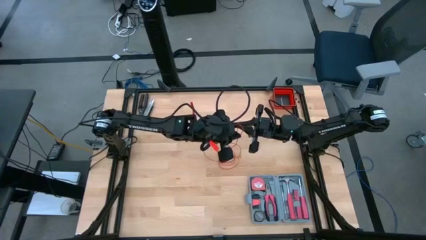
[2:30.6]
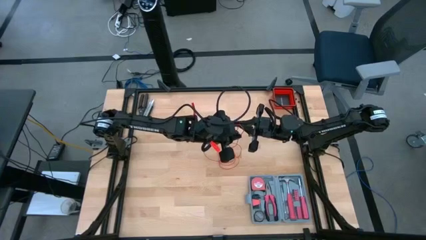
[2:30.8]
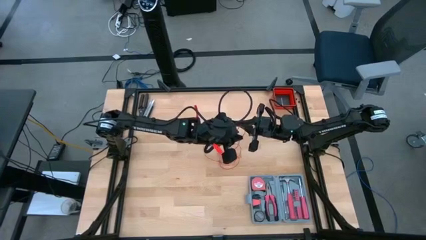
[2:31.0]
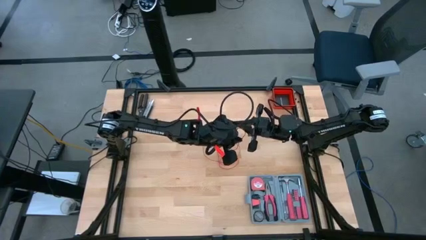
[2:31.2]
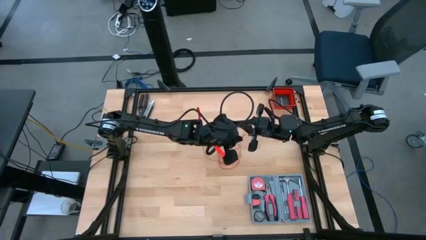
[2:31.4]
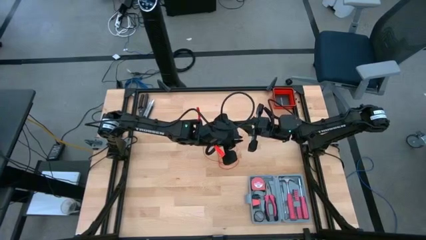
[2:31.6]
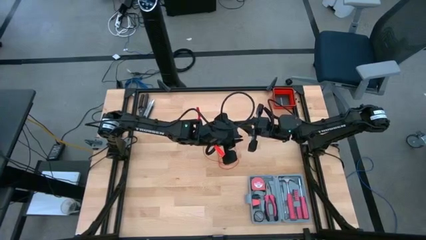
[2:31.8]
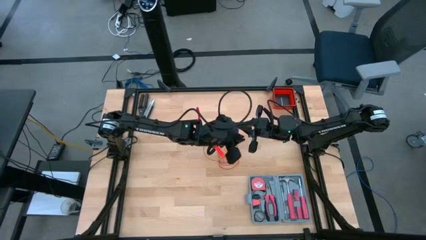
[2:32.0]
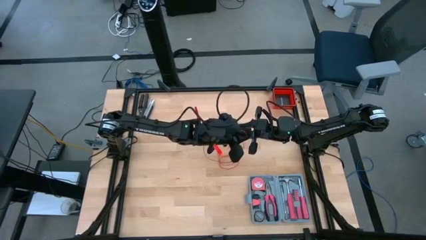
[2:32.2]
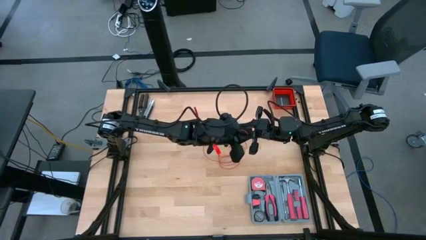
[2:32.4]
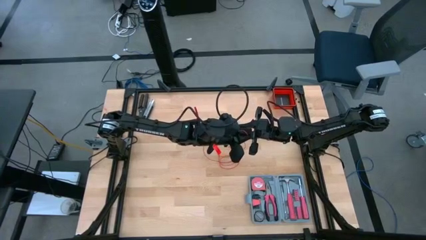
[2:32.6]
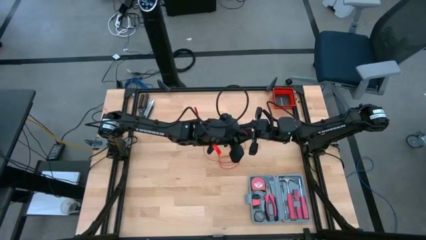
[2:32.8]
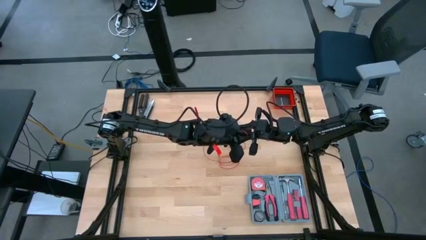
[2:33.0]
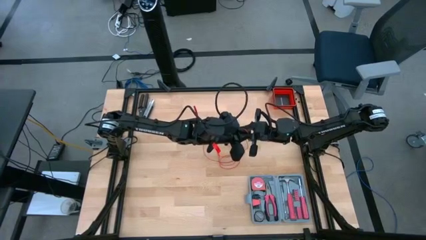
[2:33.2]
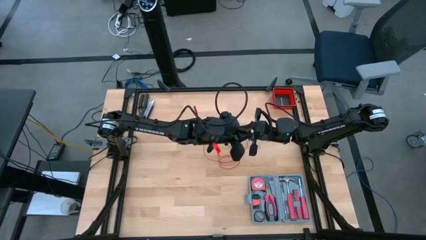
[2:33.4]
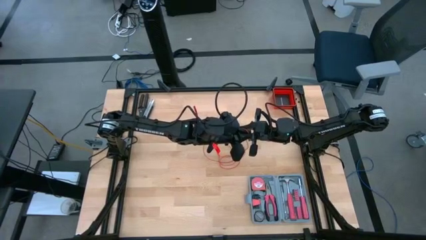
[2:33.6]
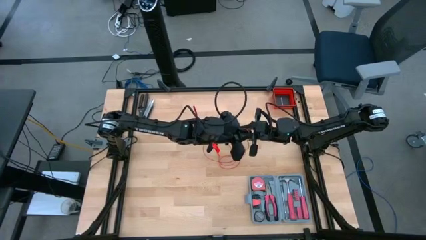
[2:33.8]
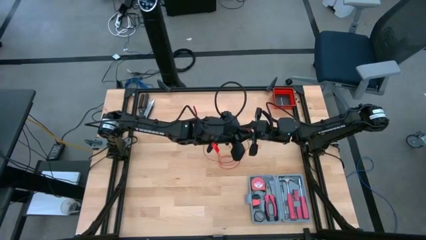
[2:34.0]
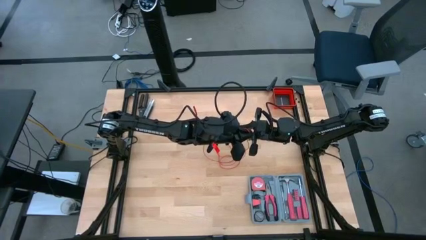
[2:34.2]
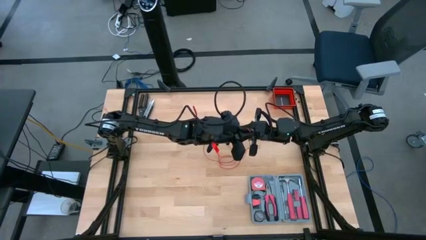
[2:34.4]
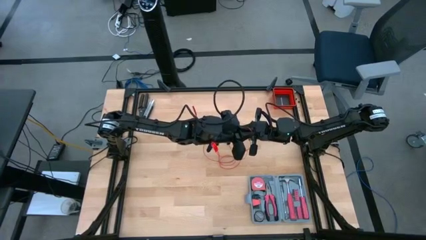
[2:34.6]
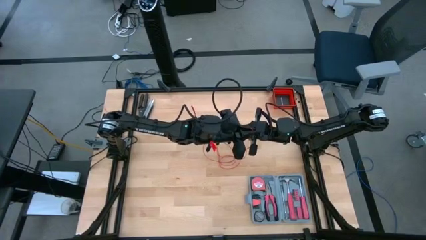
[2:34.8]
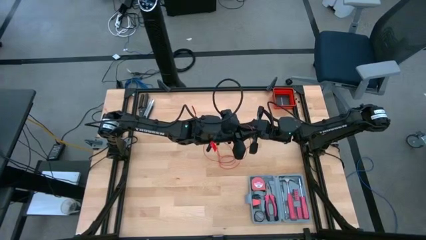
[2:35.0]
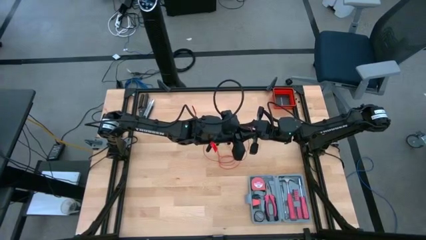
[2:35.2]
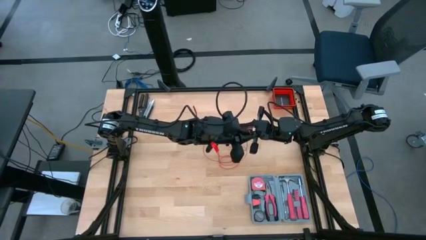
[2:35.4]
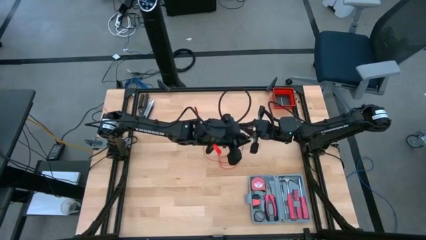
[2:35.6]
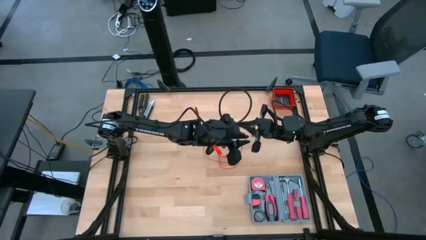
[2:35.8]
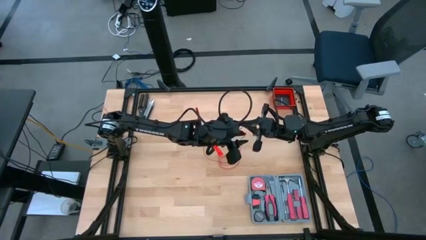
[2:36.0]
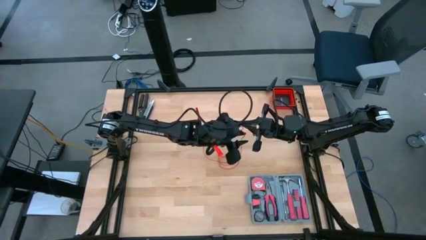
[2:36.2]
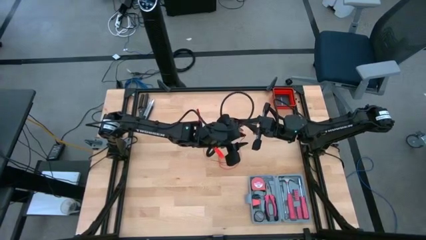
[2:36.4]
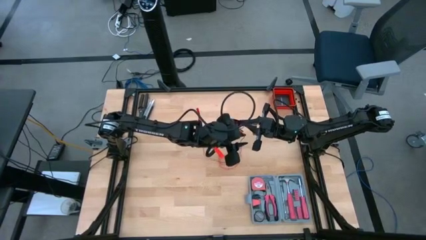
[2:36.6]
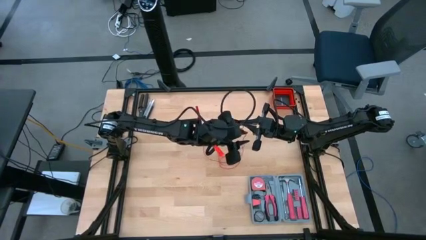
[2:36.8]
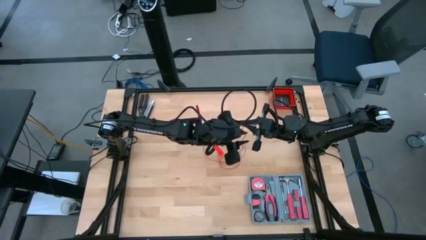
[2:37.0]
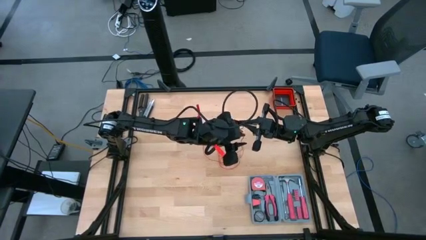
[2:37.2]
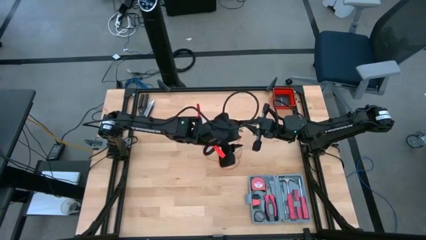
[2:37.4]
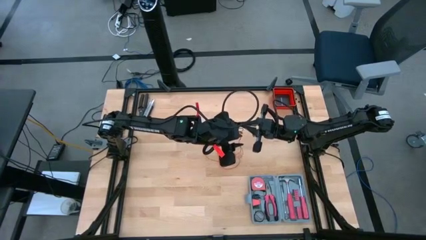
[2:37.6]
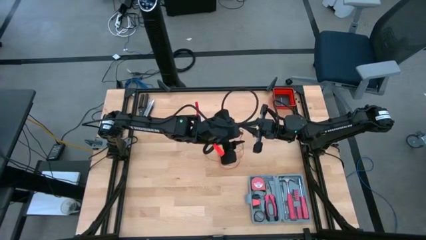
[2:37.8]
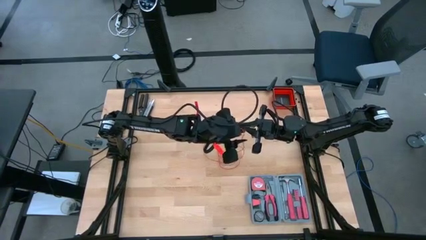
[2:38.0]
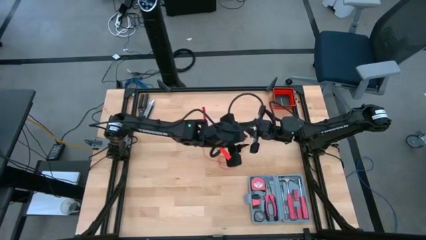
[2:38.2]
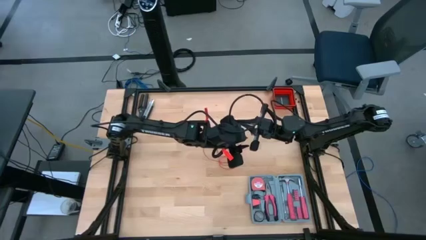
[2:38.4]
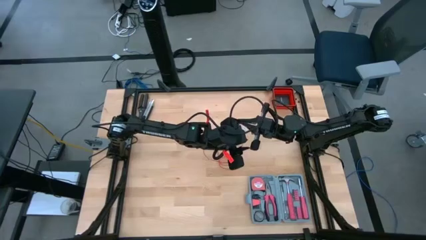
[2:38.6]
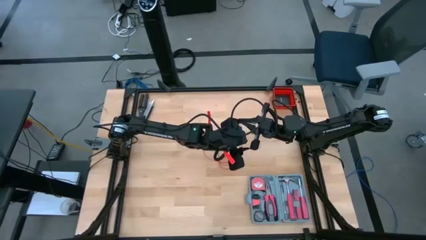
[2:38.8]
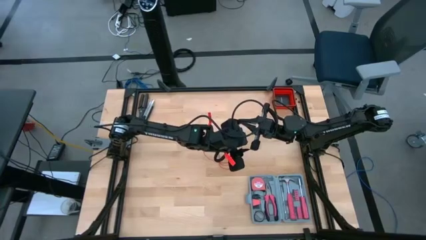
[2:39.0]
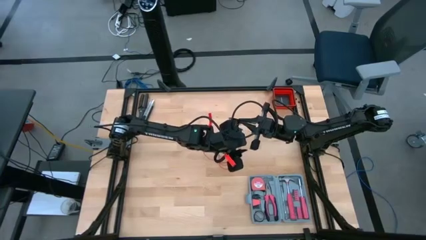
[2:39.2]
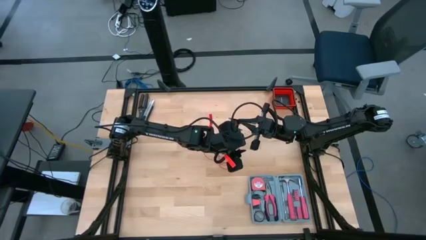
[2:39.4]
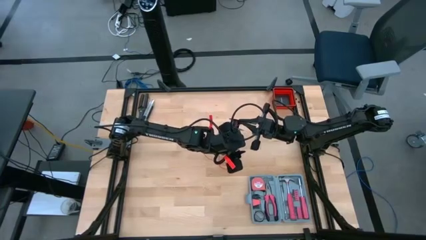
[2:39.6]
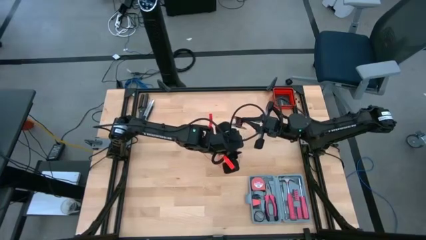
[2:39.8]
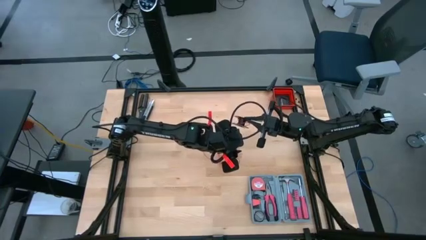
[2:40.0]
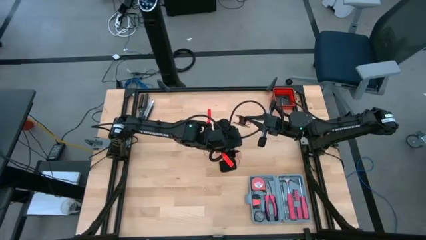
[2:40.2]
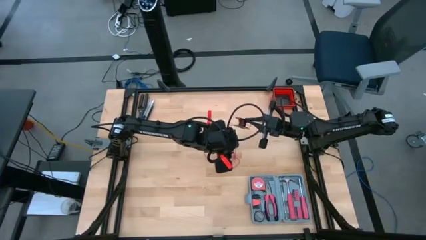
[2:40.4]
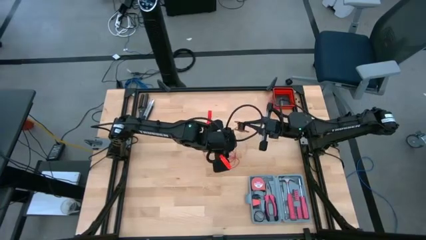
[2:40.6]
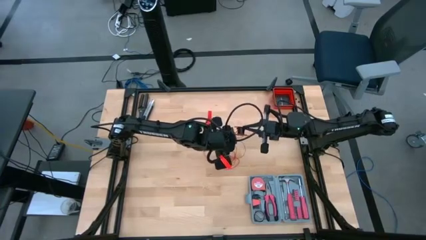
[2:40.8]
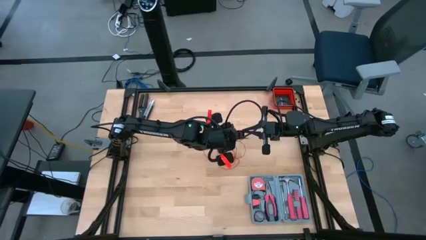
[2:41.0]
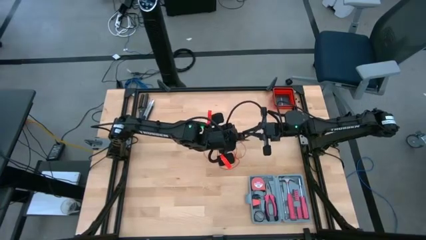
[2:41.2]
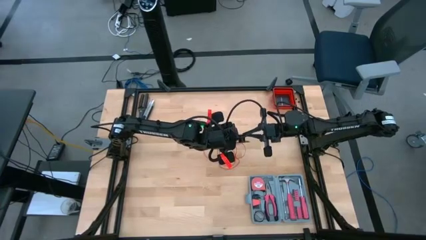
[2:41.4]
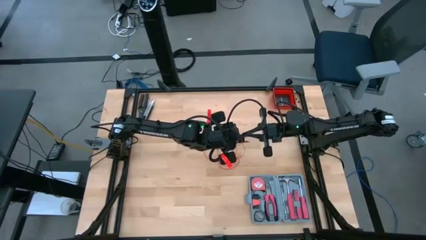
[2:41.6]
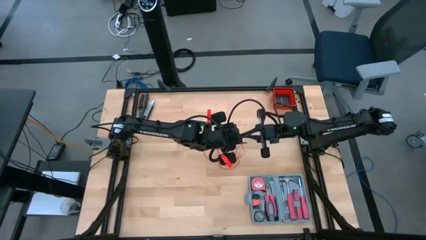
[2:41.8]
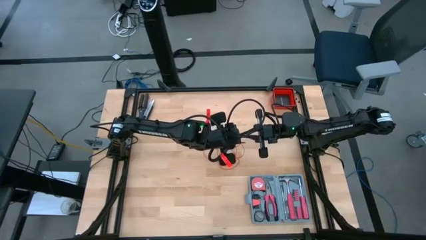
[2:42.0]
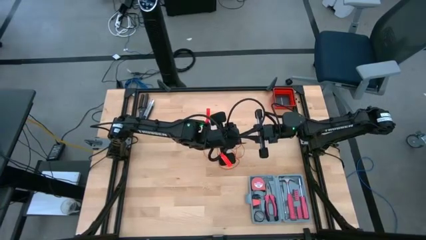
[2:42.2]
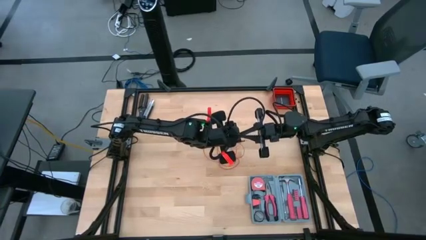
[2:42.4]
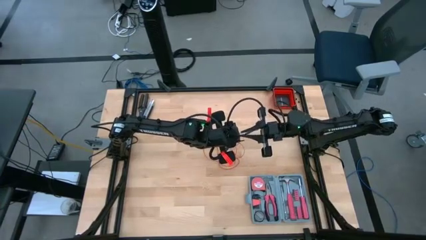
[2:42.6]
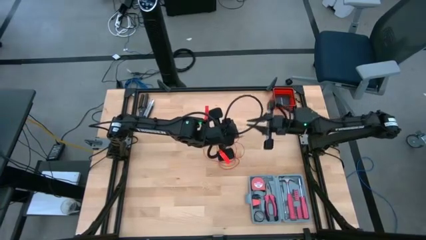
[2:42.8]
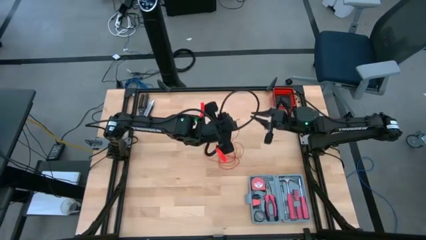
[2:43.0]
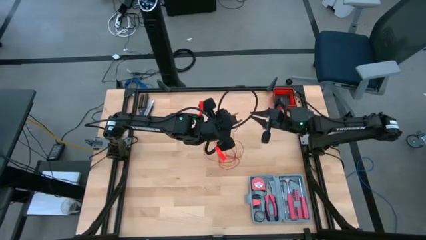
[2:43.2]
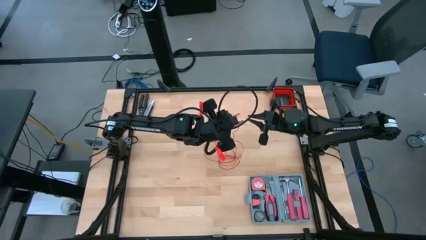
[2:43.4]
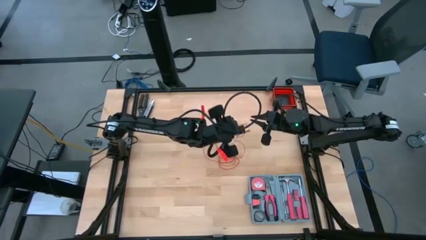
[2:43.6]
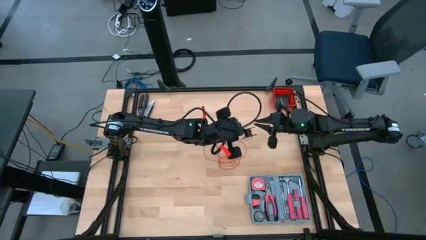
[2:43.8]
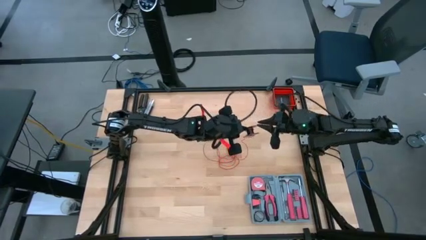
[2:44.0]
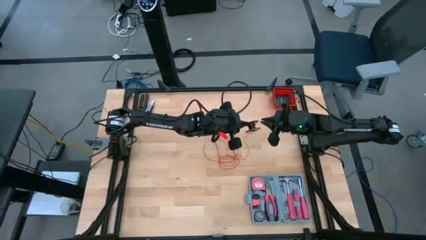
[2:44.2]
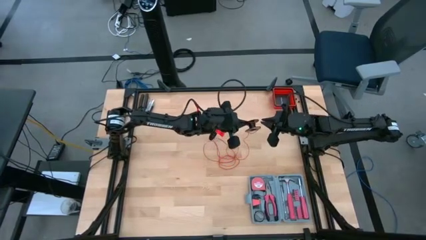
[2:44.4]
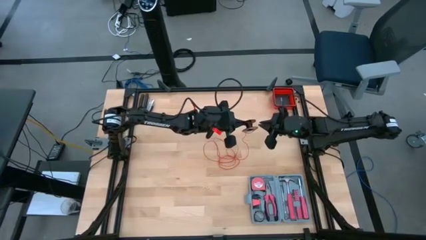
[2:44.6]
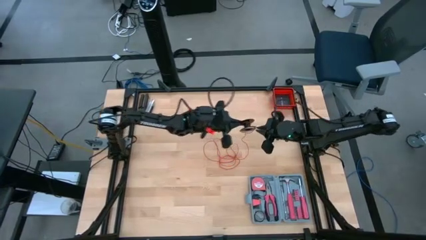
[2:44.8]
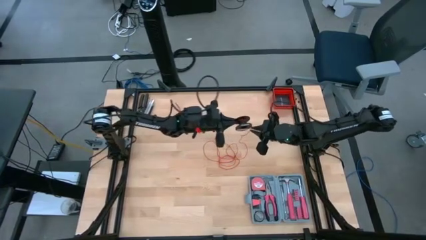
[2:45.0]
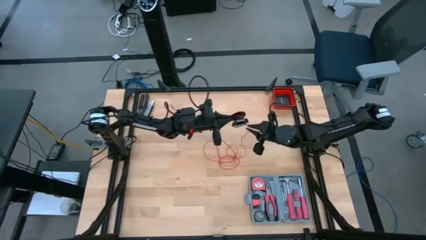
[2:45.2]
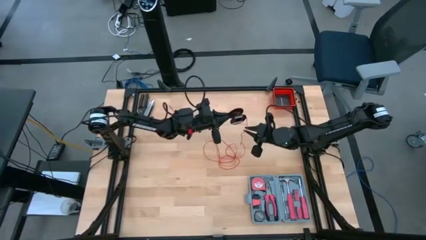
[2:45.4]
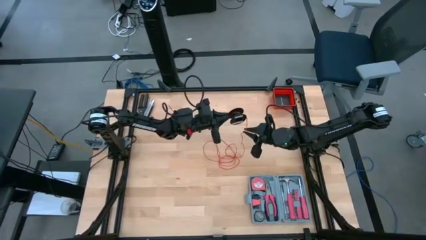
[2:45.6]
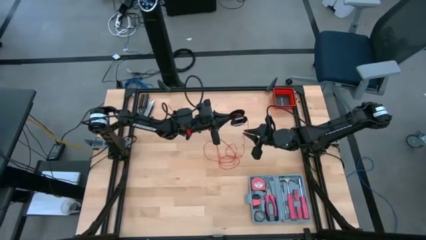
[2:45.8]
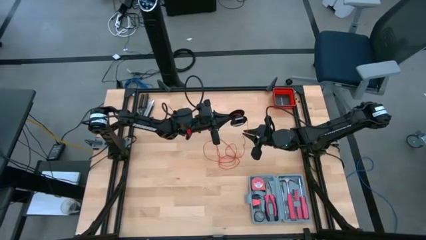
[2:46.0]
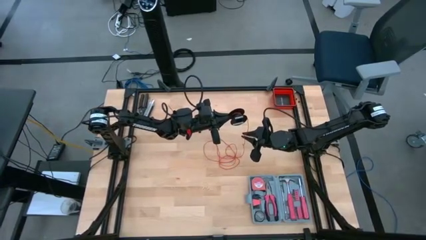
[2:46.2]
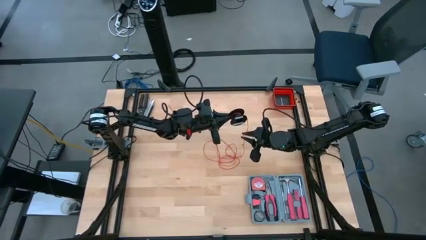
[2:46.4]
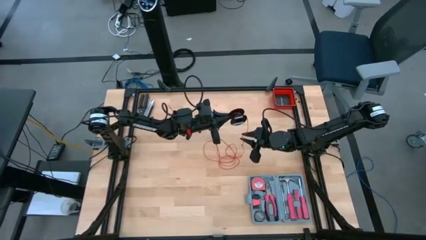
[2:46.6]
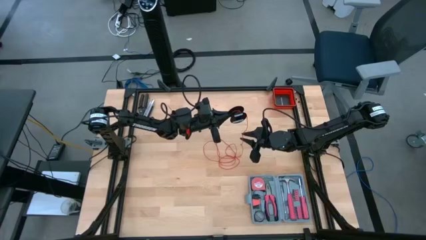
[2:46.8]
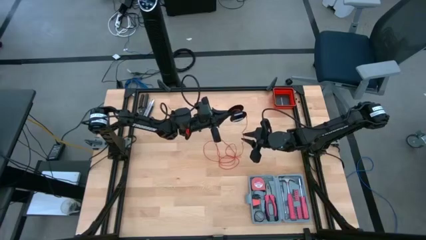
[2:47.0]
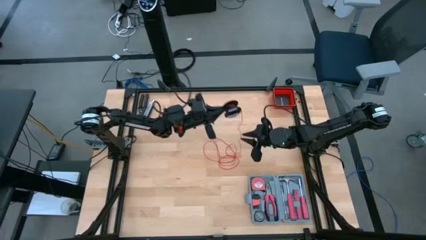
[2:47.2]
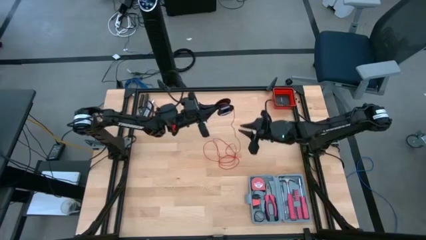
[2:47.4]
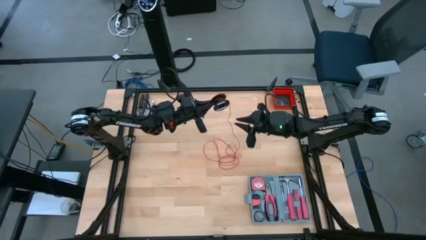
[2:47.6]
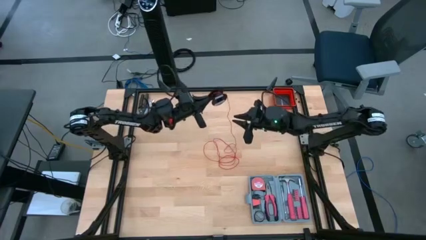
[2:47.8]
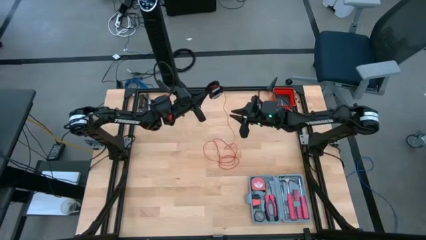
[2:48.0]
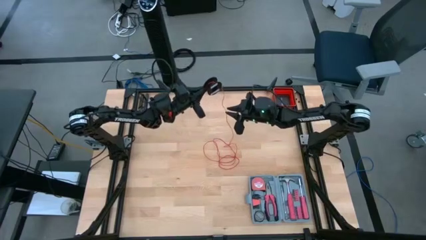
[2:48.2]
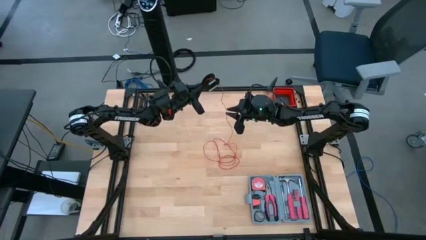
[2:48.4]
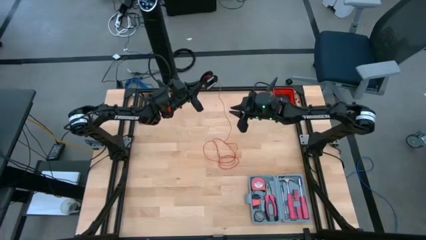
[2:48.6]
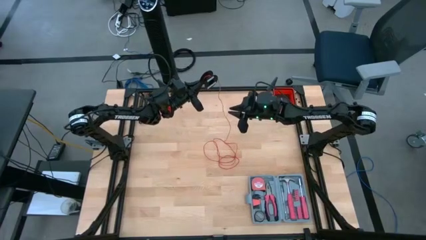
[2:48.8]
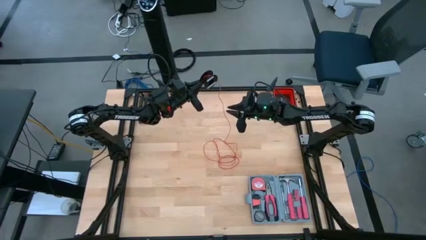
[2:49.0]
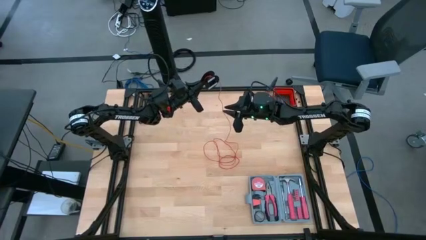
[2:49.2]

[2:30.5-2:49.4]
Task: Coil cords
Coil the wire
